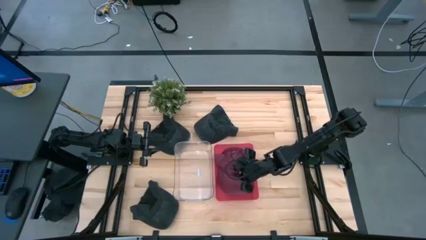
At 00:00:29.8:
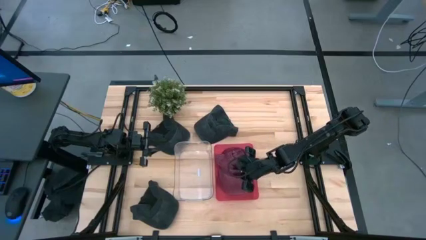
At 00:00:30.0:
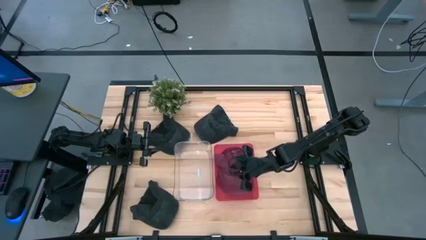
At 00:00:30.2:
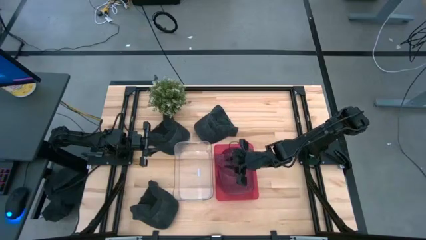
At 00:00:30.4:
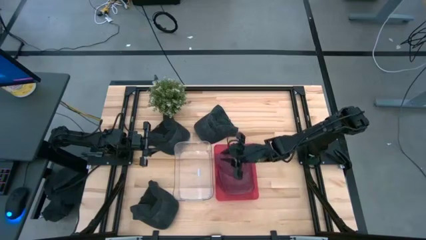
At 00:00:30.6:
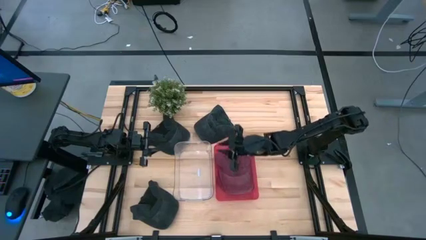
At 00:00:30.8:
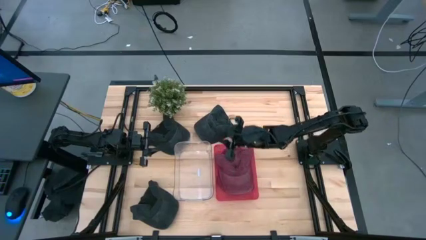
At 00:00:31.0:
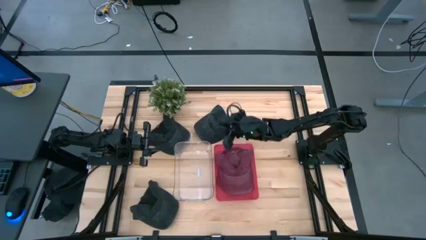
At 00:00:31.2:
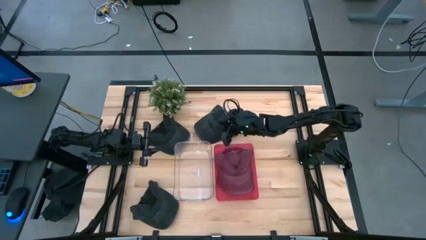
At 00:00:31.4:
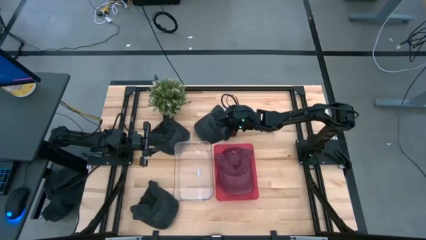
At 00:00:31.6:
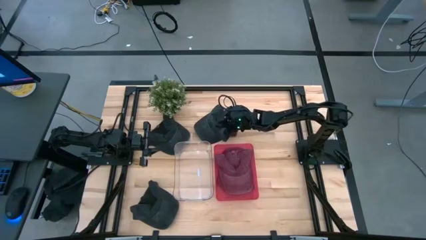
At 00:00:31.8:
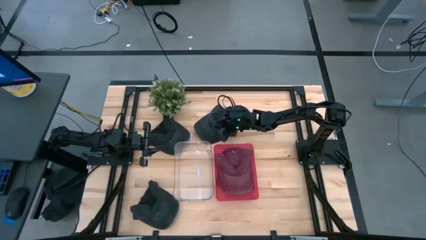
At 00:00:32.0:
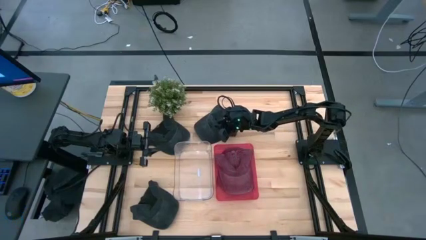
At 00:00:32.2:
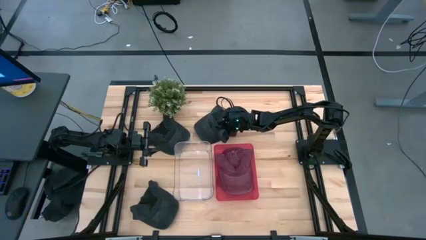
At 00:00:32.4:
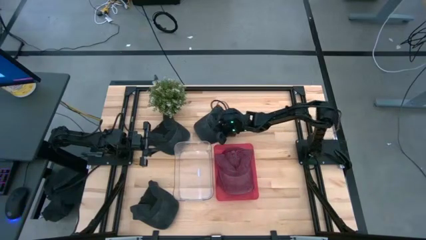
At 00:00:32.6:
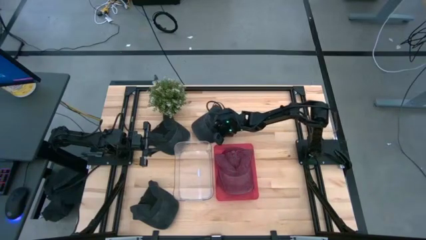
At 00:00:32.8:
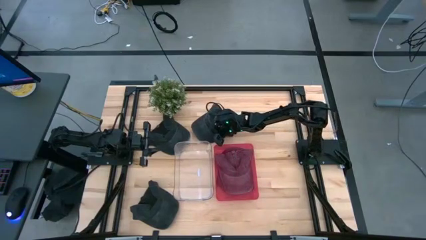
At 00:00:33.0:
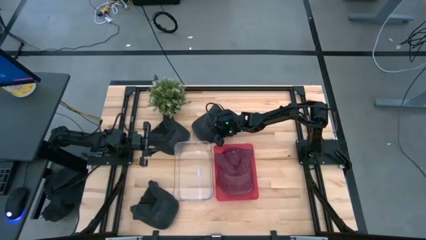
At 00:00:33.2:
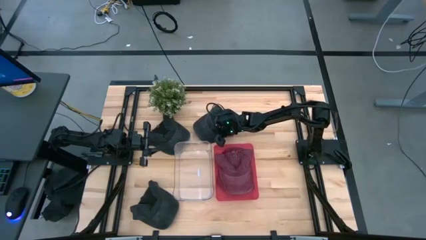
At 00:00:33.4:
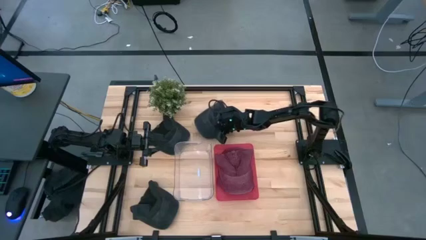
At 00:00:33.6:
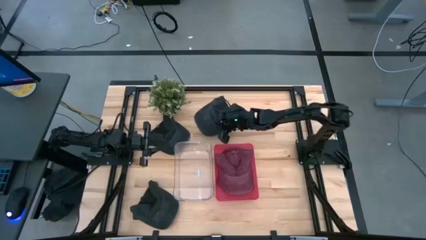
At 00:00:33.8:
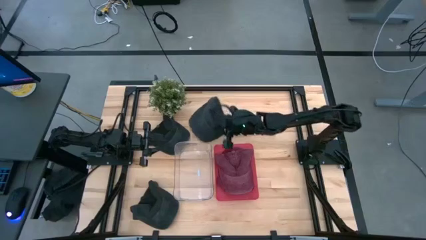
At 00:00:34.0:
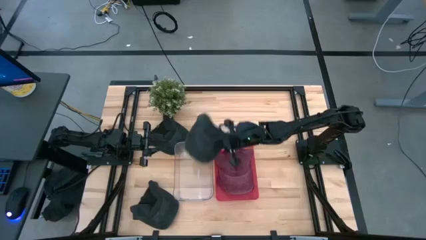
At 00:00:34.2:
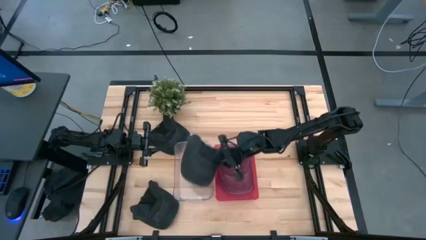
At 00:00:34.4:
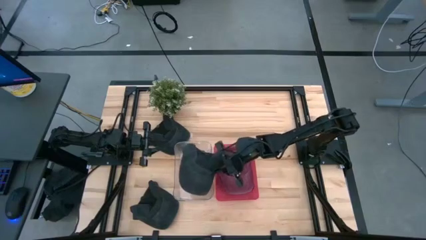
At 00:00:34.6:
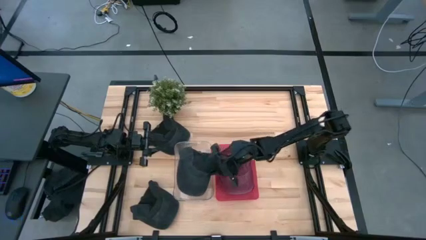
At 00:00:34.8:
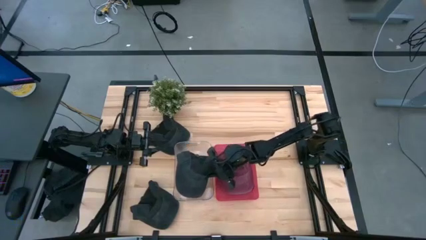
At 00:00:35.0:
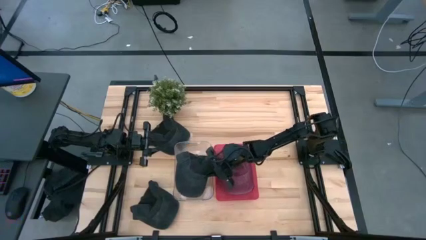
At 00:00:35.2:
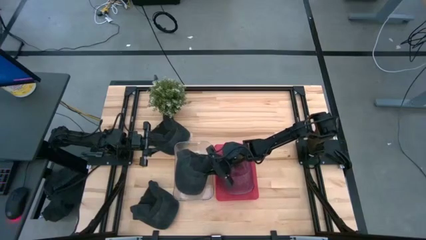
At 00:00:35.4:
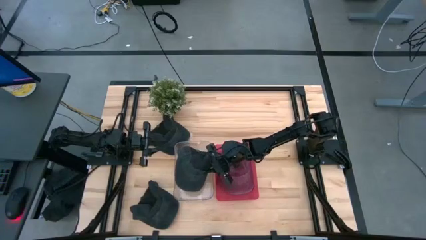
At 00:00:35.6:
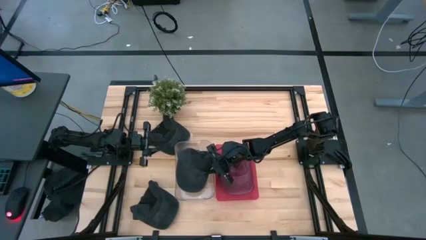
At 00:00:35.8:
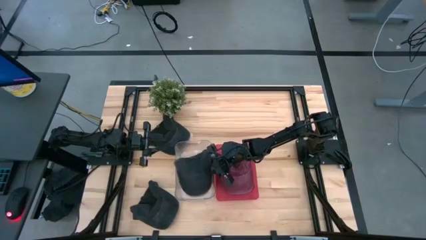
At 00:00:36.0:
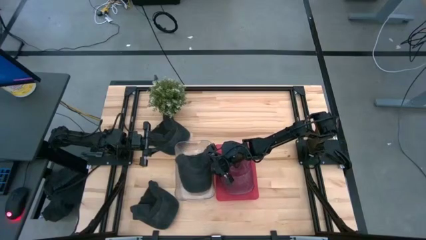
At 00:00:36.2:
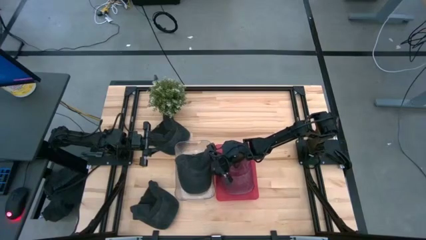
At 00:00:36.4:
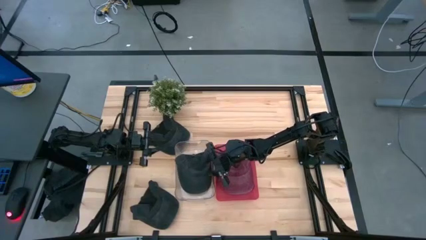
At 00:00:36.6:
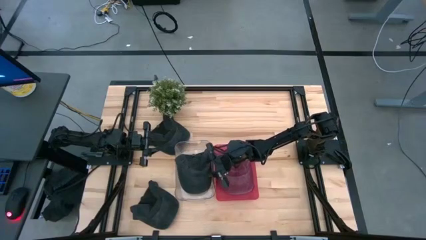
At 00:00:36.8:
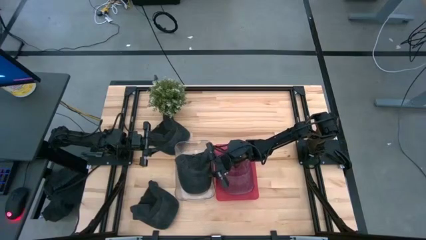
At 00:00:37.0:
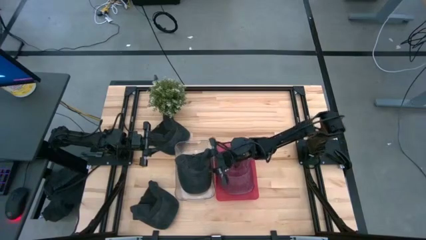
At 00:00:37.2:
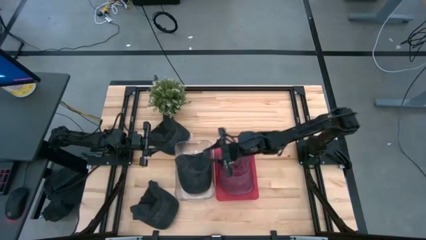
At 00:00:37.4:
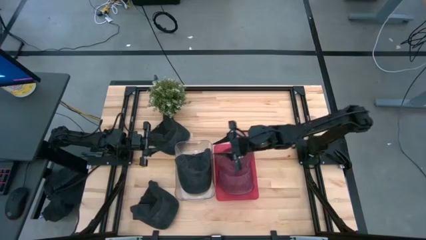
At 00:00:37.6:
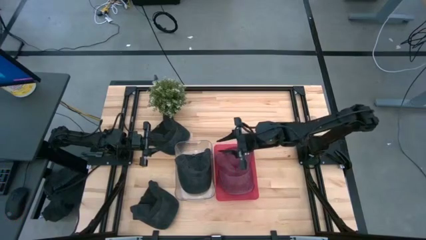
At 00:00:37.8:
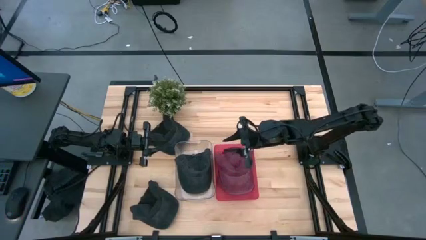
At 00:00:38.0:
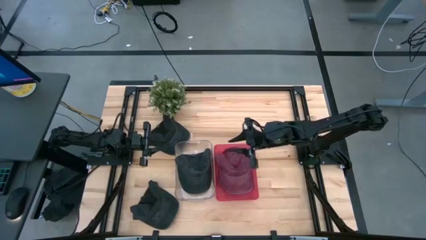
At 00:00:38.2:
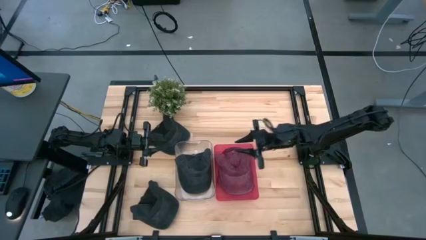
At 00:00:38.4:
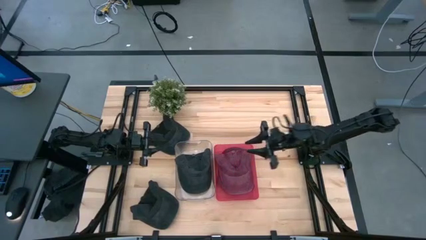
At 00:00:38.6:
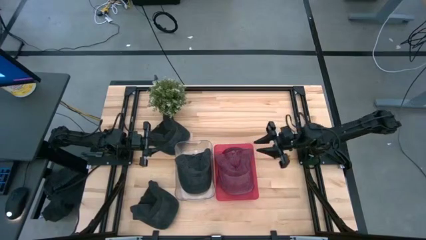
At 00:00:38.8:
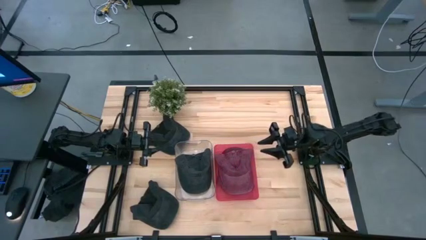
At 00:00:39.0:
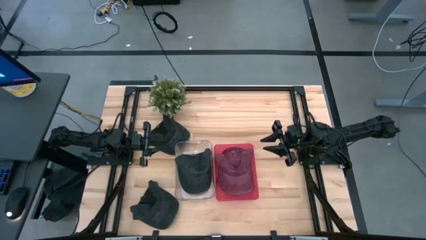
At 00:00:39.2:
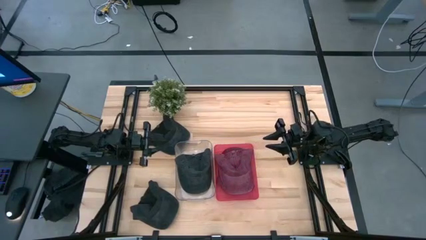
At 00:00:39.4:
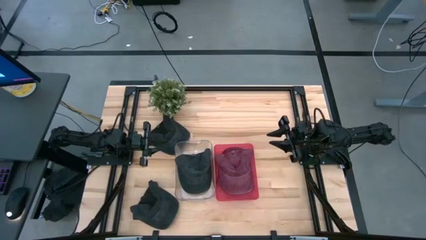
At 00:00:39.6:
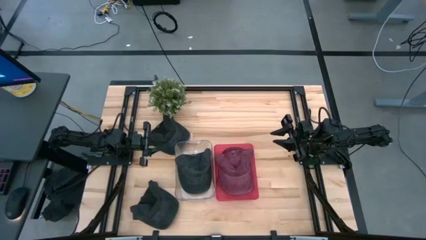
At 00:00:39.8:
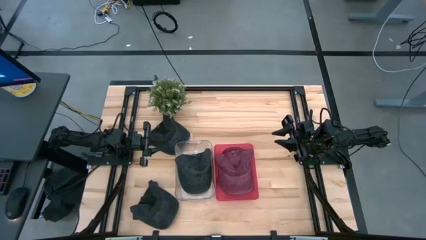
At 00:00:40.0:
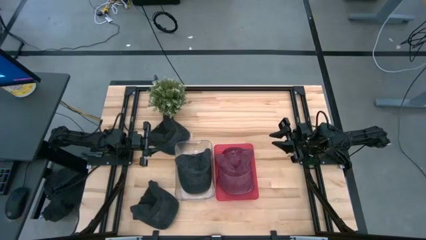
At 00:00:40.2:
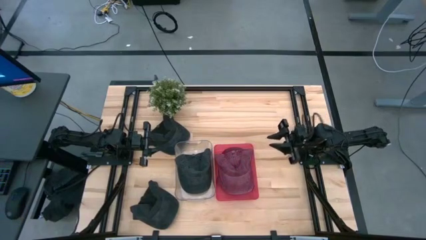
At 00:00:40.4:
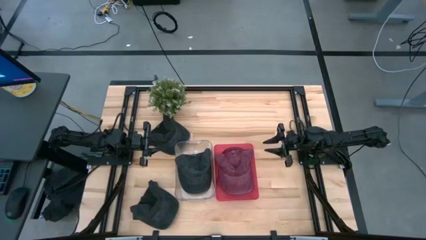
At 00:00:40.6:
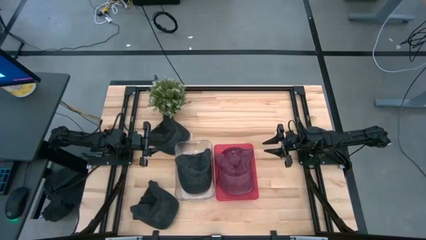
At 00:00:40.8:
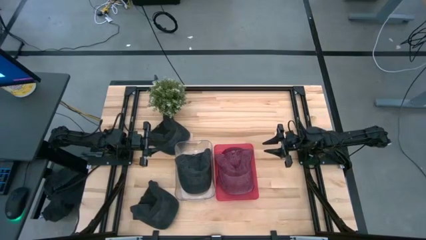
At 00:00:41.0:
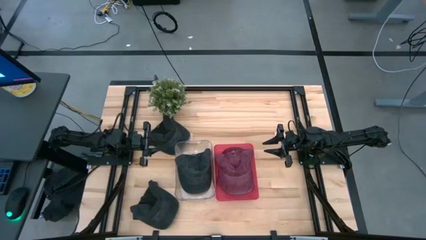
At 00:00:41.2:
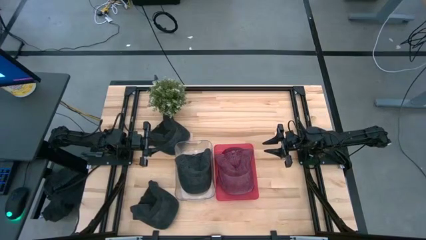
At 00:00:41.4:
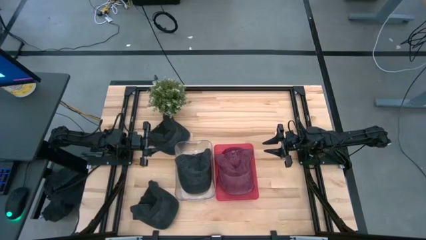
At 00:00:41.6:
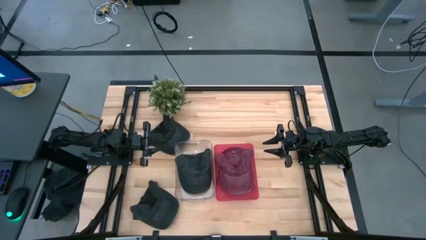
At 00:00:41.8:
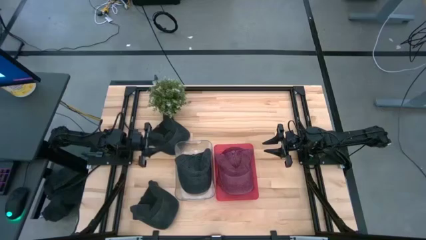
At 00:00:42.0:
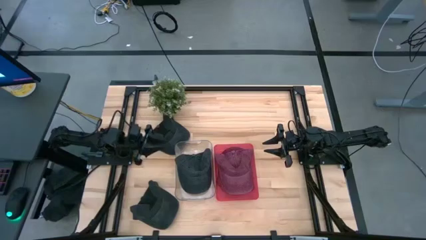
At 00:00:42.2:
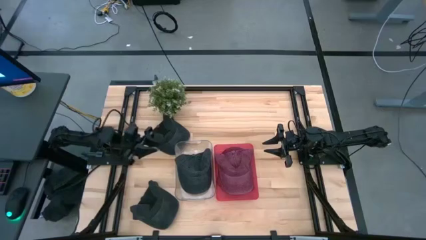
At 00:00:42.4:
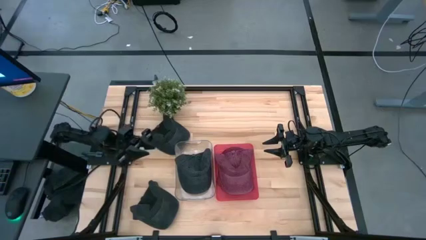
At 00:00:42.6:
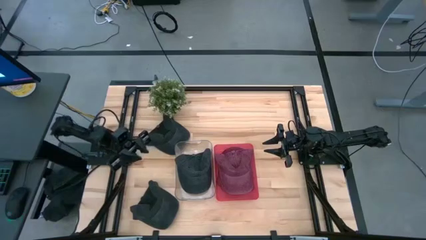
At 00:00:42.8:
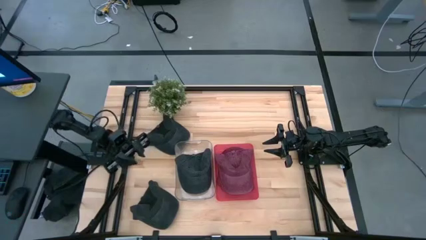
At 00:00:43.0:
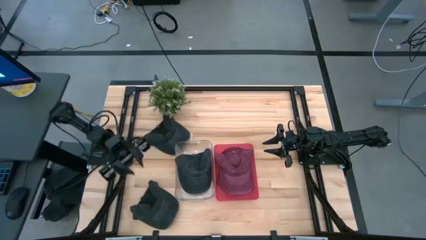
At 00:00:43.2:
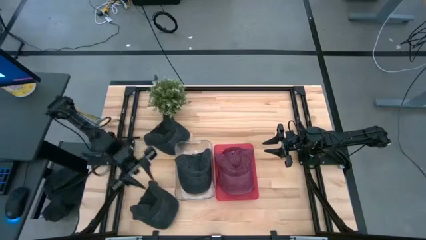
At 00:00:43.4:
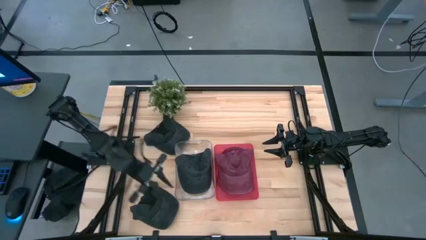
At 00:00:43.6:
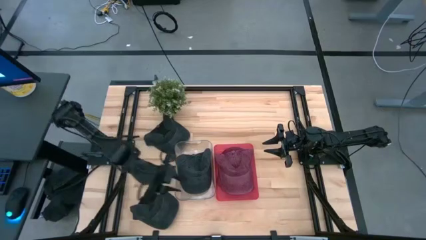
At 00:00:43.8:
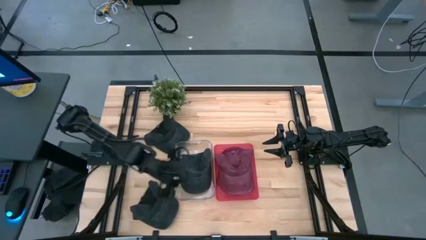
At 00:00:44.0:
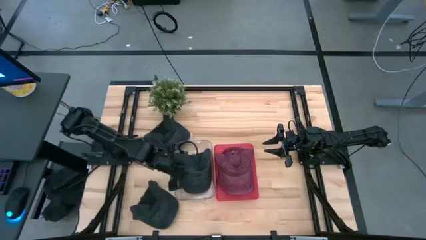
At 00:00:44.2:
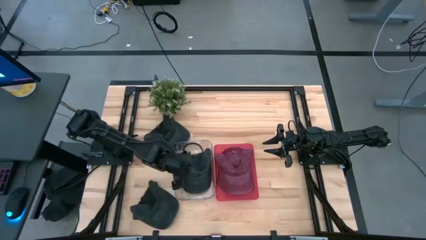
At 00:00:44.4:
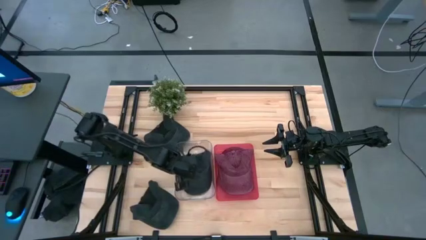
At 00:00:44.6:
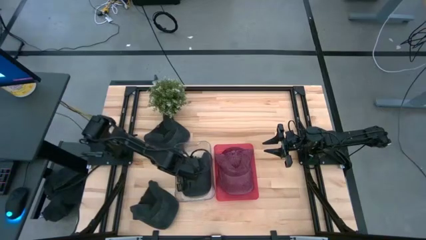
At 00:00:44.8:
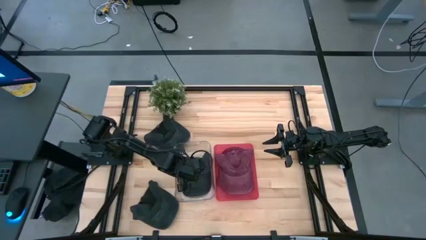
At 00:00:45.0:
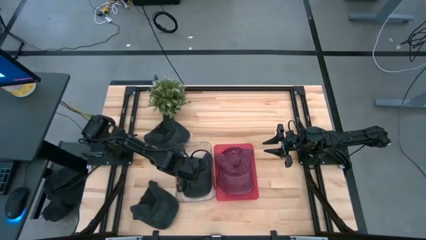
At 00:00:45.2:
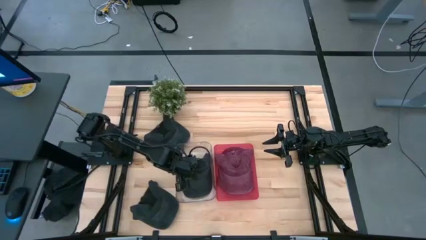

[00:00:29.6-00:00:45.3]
Task: Pick & Place hat
Put the top right black cap into the transparent bin
